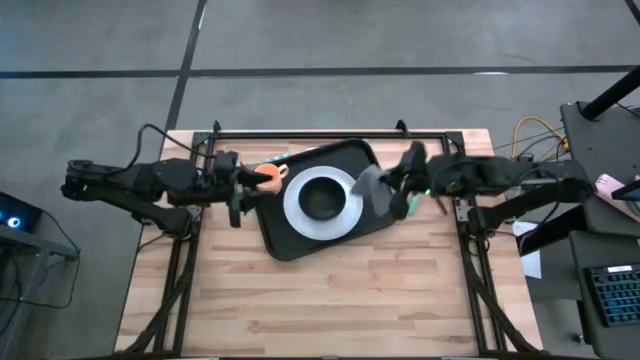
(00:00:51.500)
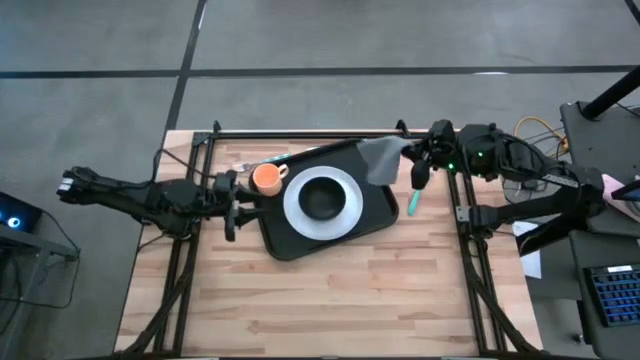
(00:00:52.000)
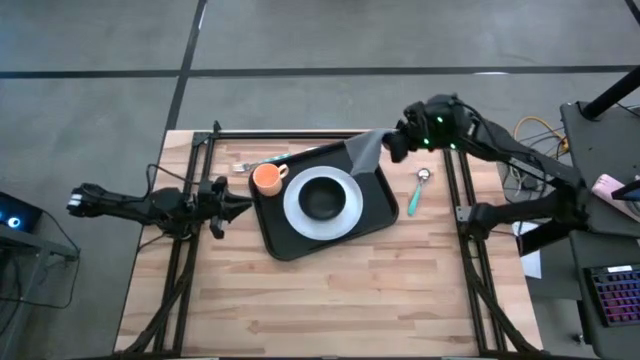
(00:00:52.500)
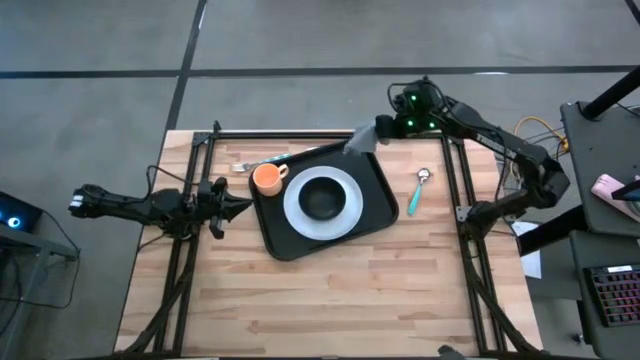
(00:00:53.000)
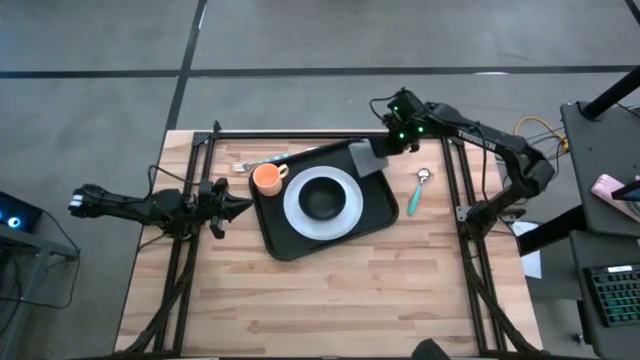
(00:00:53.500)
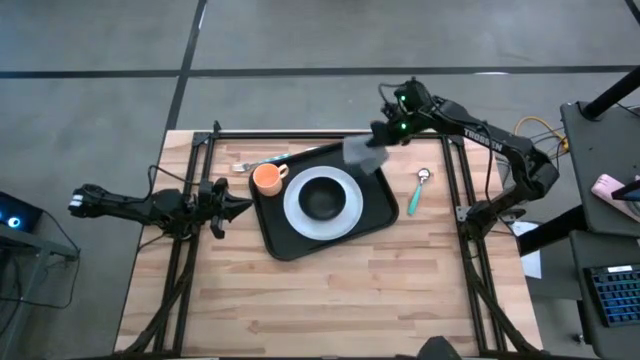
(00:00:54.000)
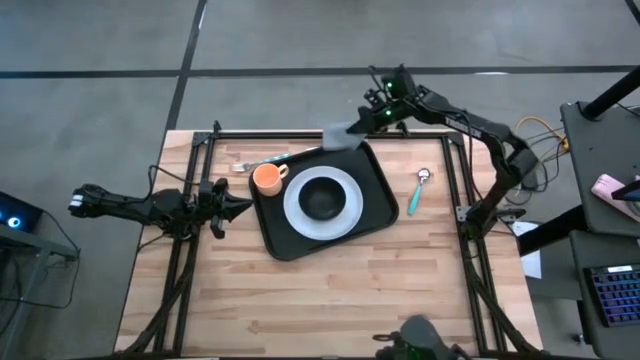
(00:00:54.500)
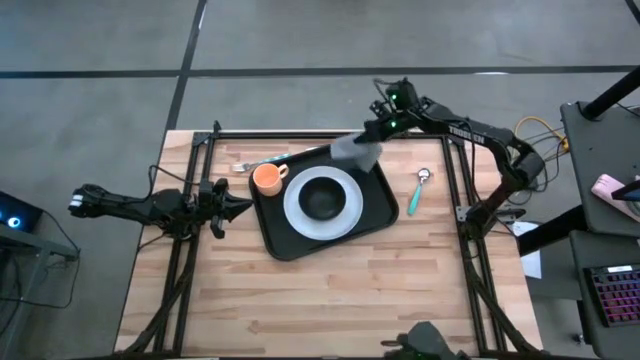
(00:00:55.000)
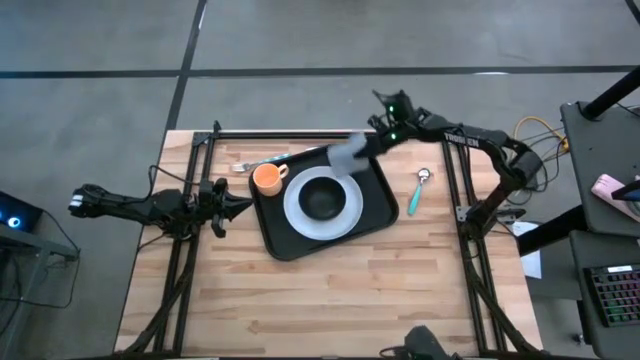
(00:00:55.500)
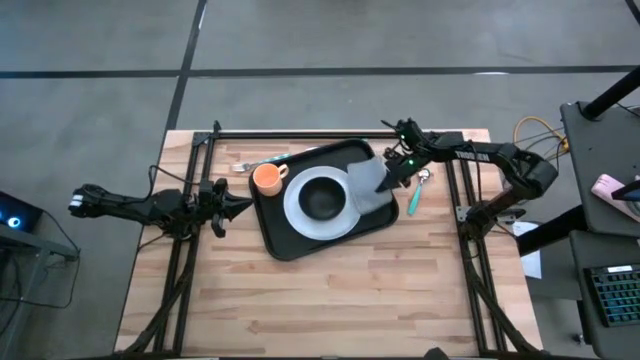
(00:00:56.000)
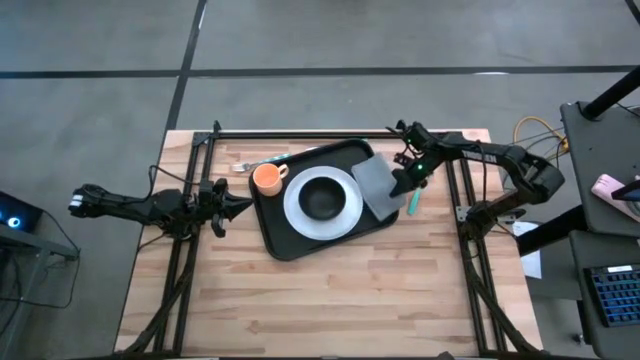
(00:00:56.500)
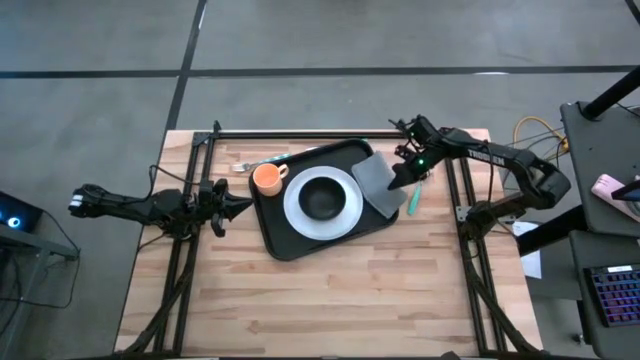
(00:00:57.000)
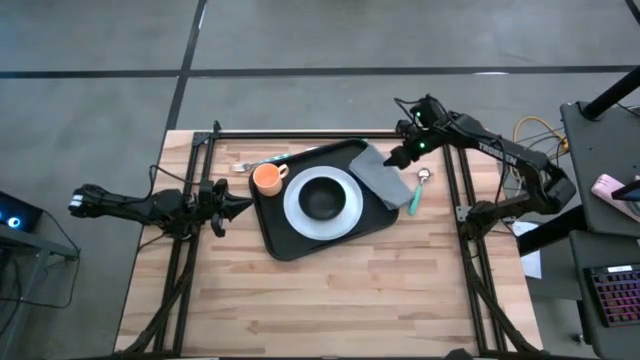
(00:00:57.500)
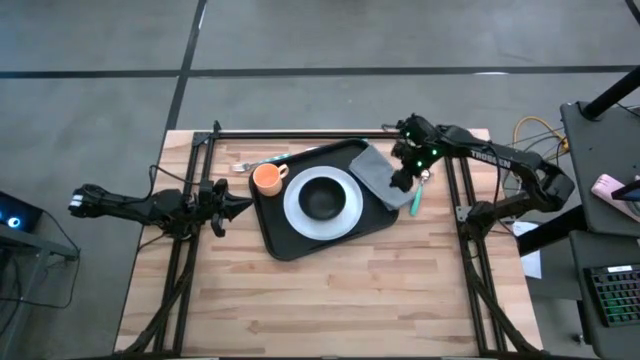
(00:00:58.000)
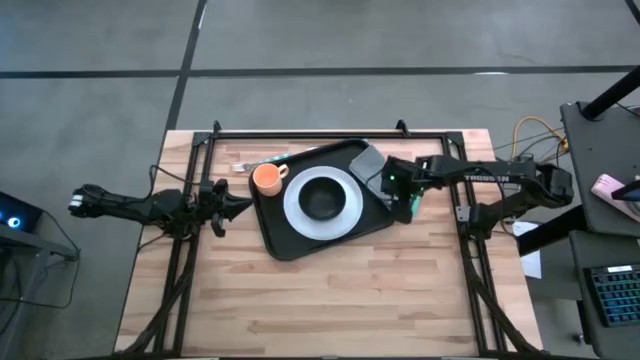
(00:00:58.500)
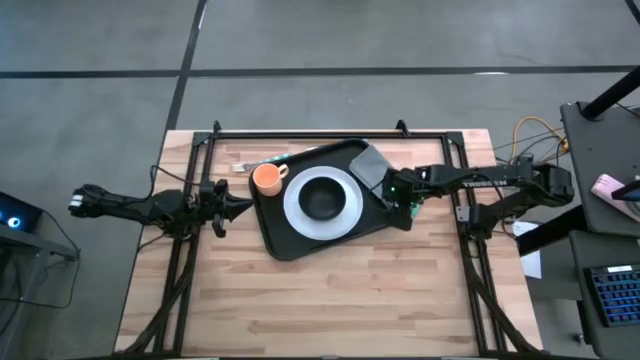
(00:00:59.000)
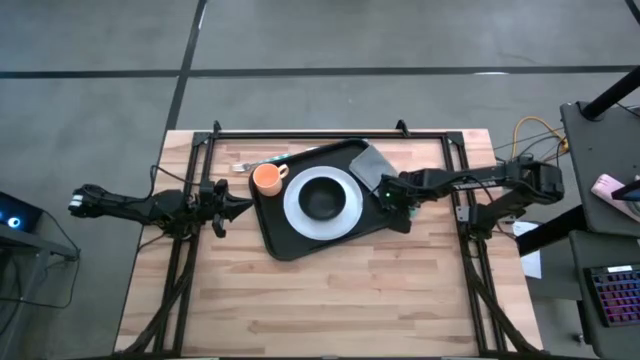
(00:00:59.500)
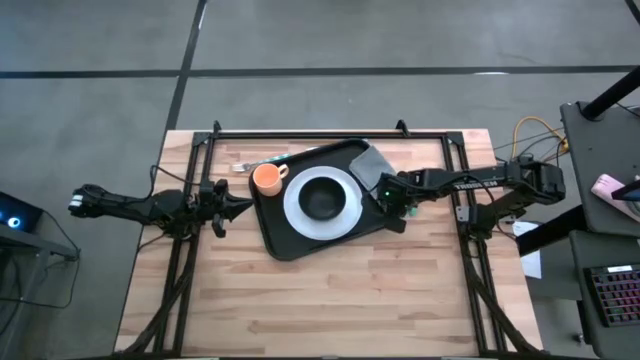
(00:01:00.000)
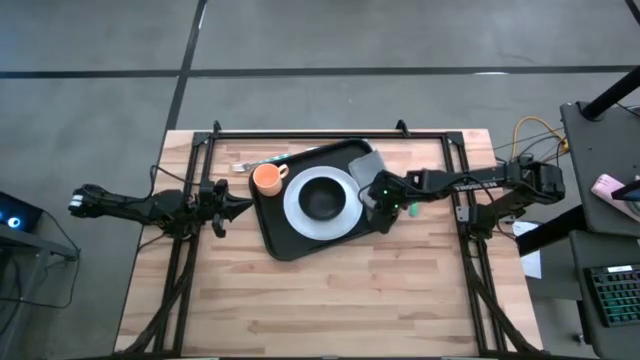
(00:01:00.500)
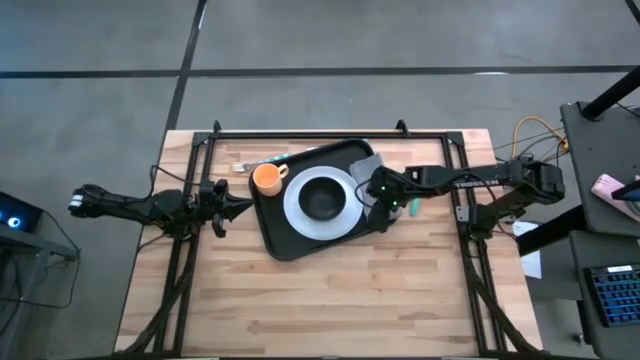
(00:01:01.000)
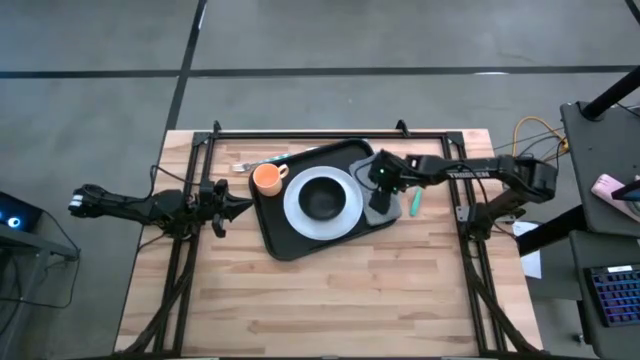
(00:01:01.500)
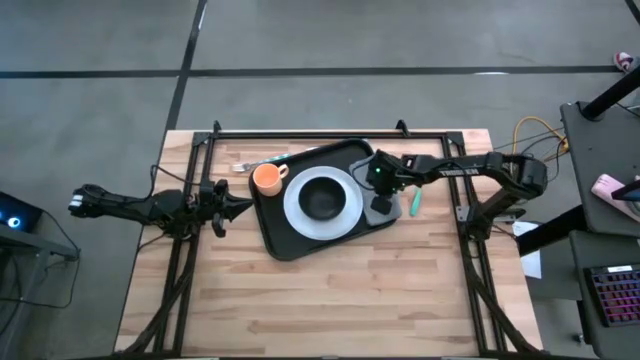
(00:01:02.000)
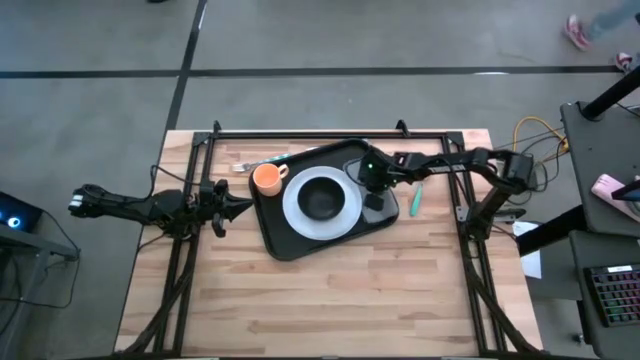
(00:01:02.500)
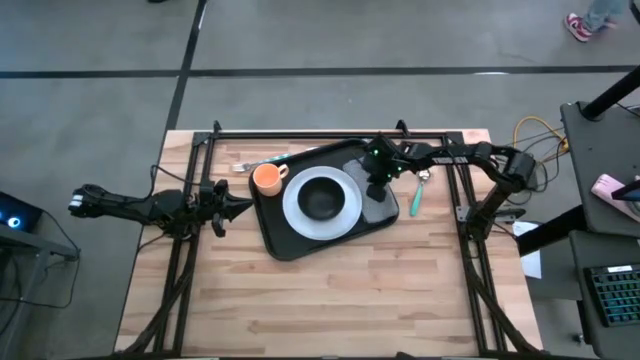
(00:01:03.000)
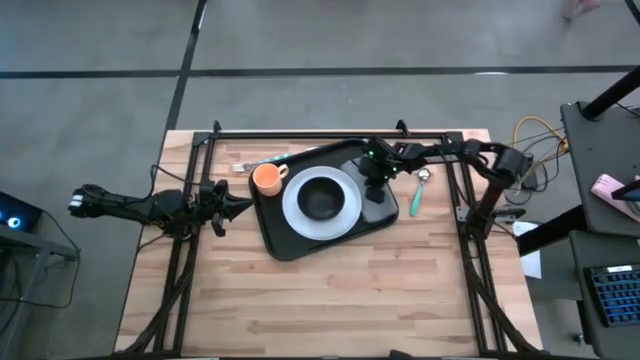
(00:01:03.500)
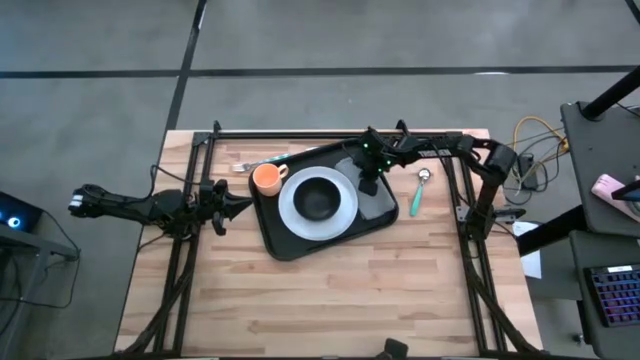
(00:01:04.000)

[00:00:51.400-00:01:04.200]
Task: Set up tray
Put the gray napkin on the black tray to the right of the white plate

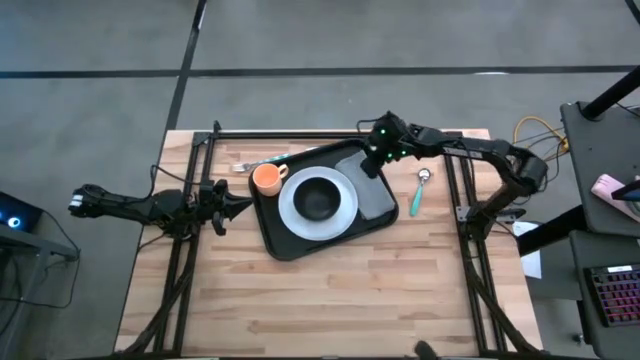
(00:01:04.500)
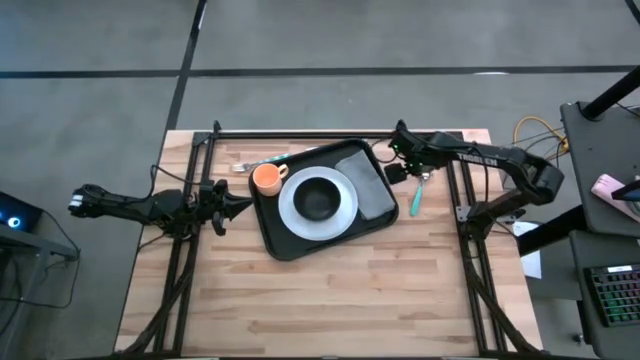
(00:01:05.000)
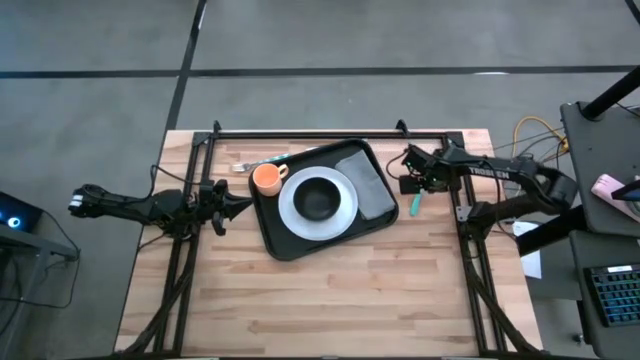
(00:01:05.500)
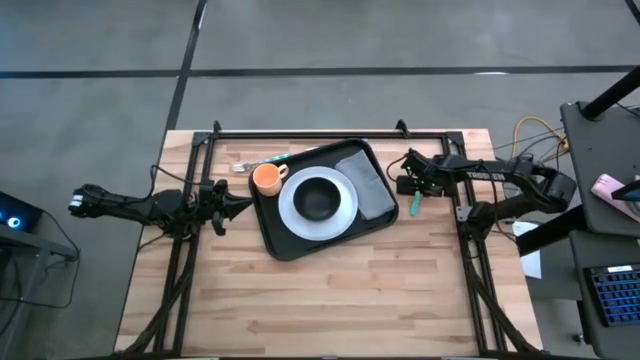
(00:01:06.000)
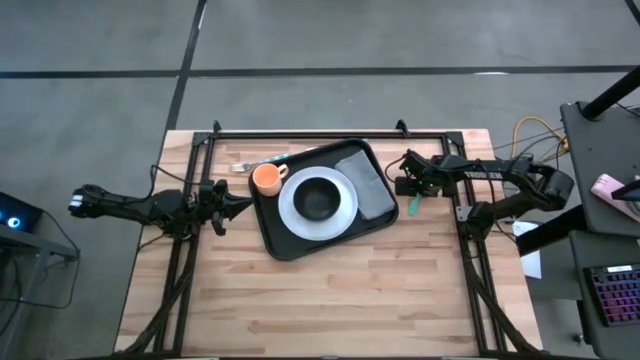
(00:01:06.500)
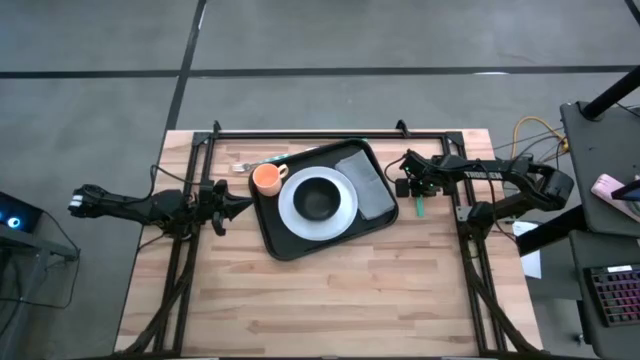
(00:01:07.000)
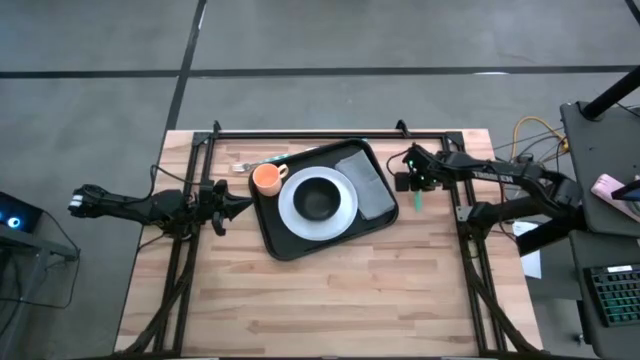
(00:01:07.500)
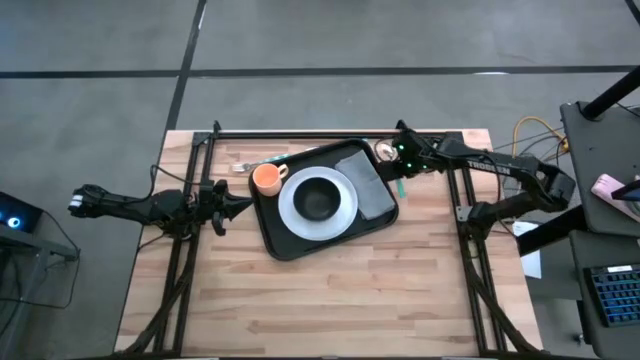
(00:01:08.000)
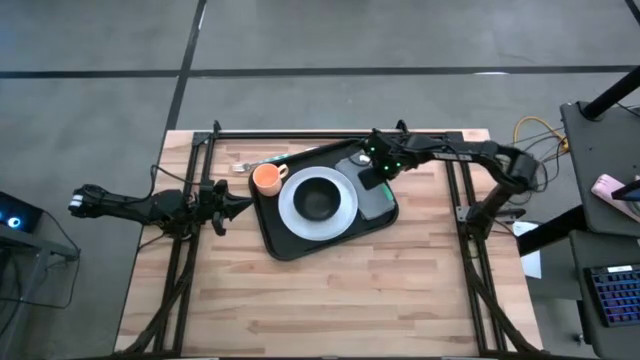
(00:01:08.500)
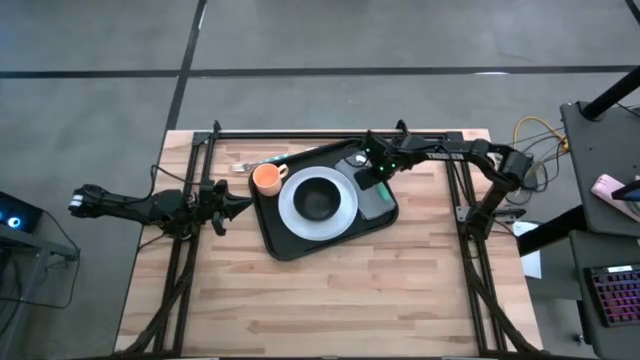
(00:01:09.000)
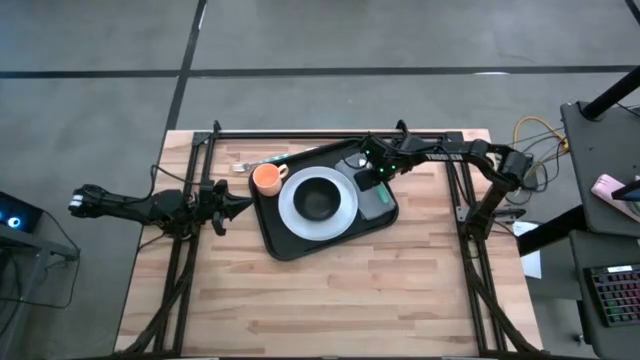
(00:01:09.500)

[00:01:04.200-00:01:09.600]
Put the light blue spoon on the gray napkin on the black tray

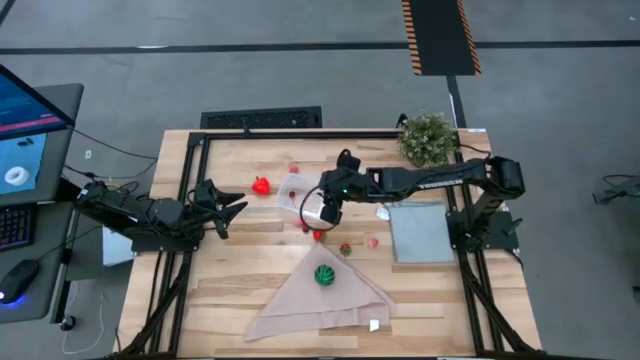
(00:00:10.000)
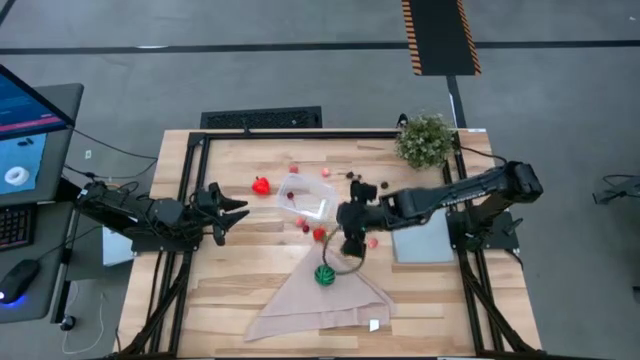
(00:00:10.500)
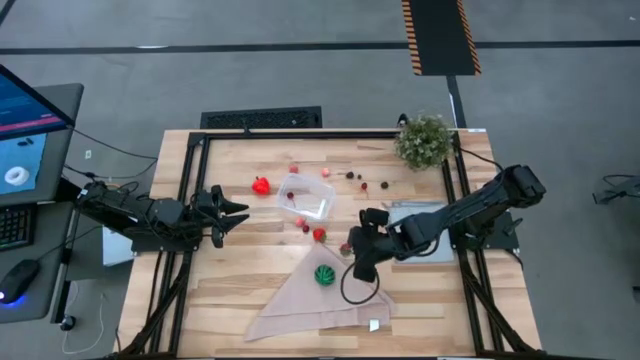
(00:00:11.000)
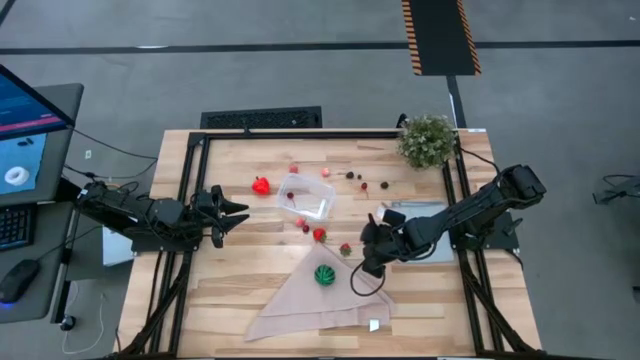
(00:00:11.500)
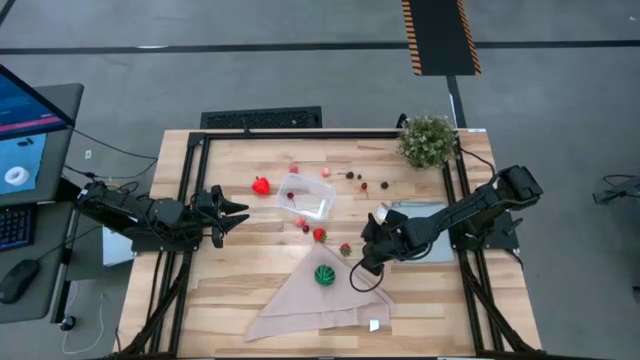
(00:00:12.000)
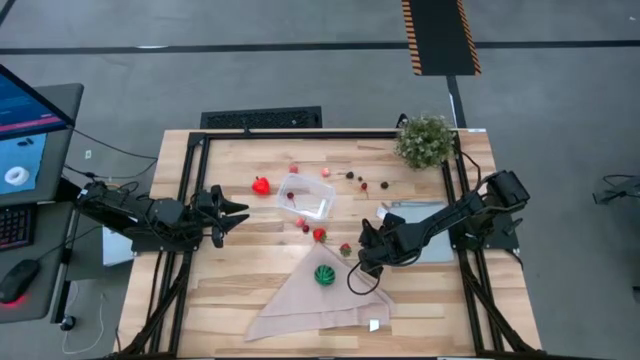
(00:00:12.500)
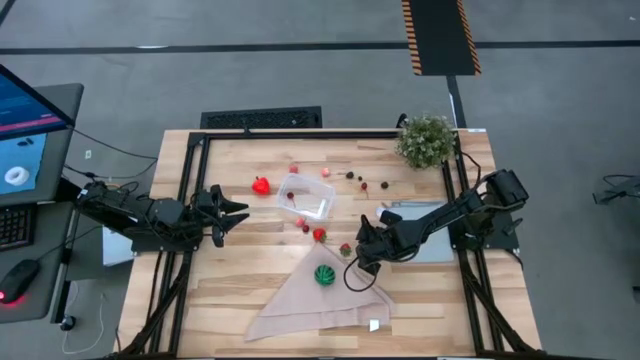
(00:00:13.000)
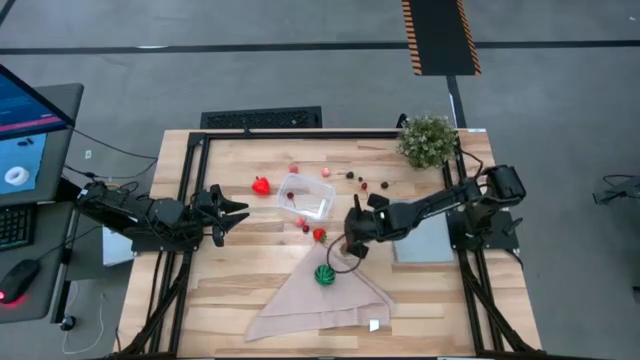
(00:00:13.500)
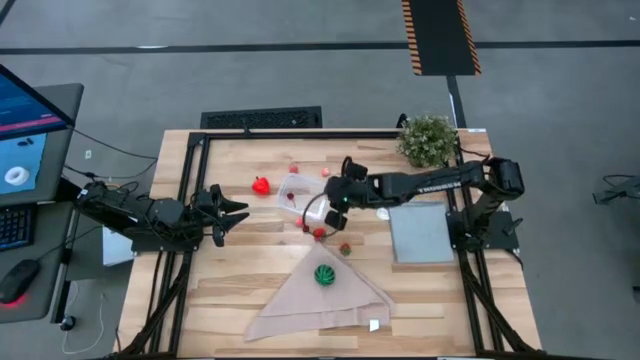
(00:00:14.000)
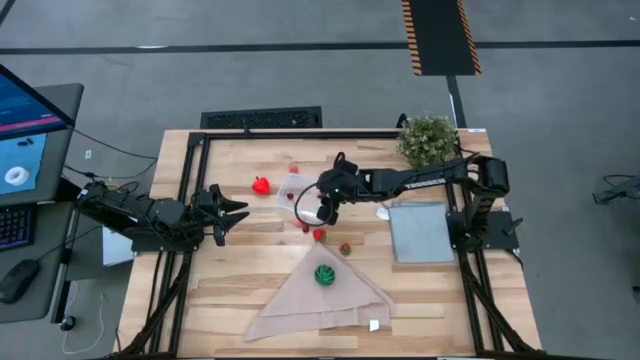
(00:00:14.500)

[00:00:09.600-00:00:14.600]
Task: Pick and placing Produce into tupperware
Put the bottom peach into the transparent bin
